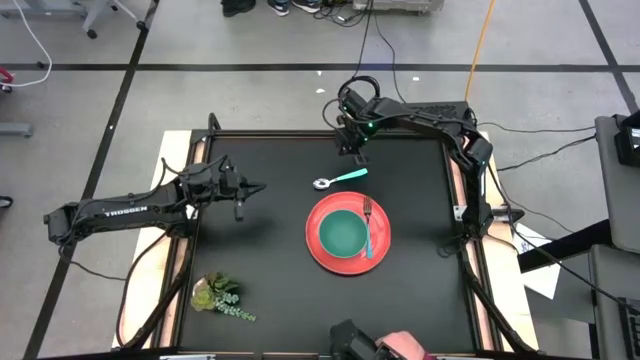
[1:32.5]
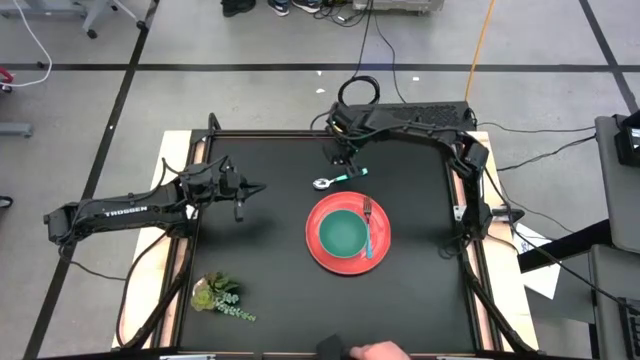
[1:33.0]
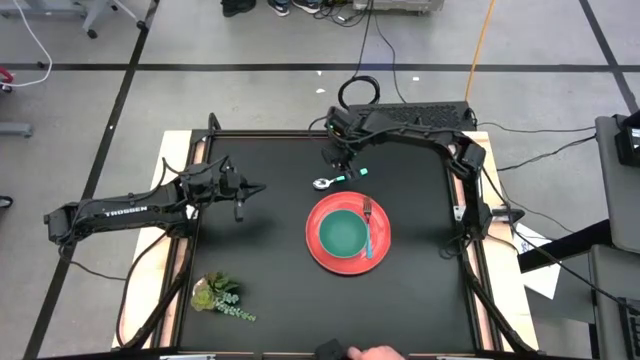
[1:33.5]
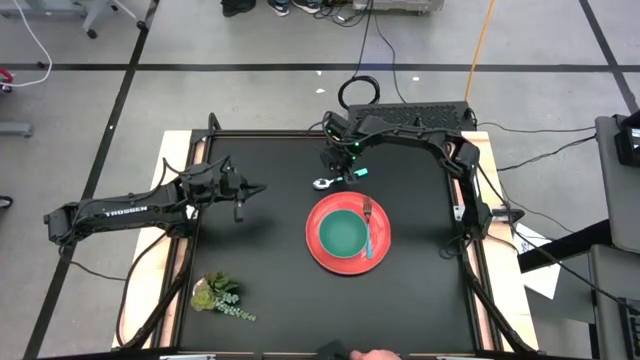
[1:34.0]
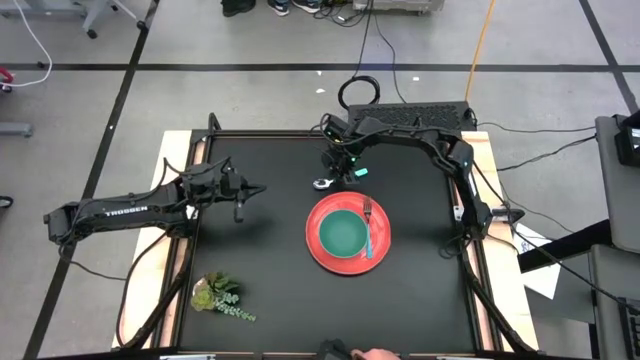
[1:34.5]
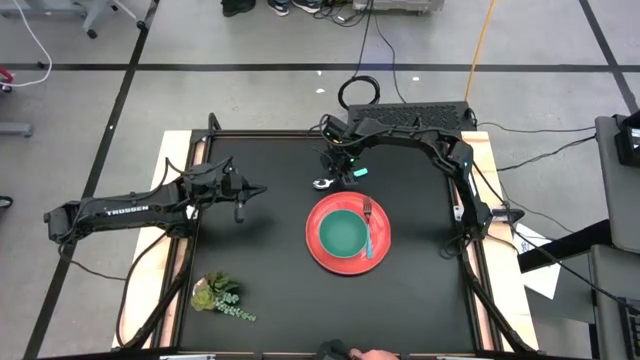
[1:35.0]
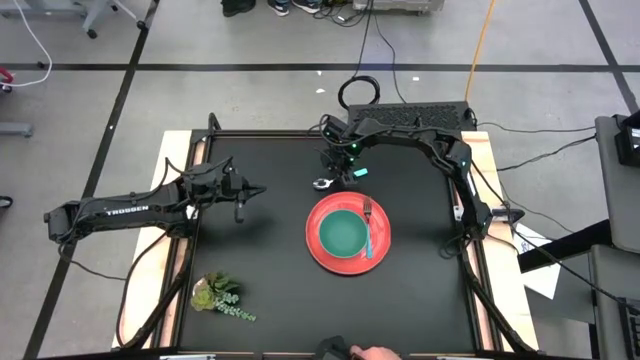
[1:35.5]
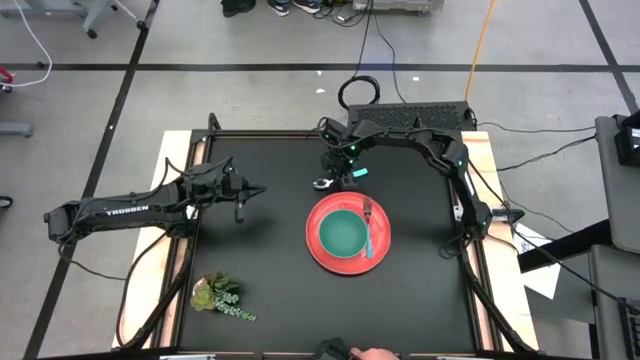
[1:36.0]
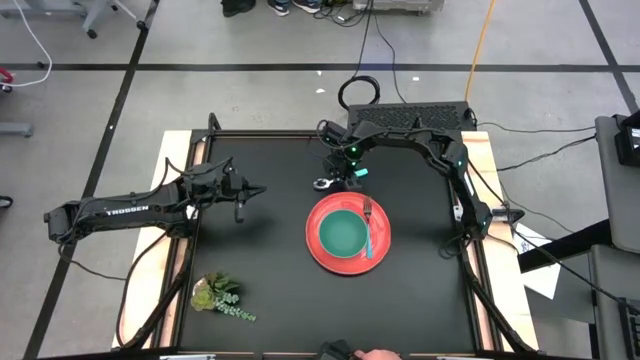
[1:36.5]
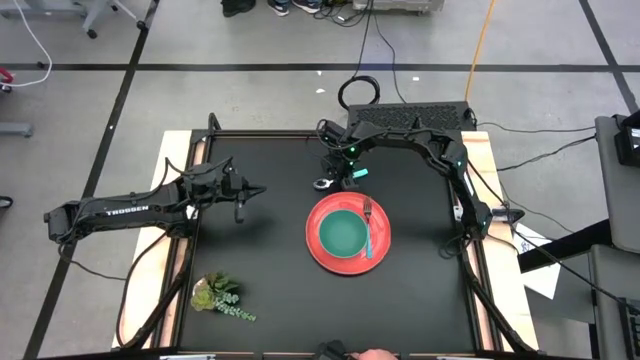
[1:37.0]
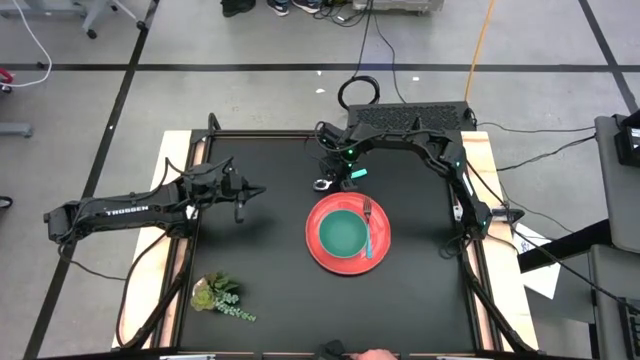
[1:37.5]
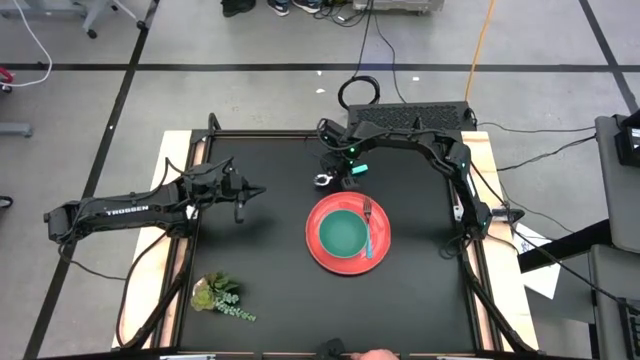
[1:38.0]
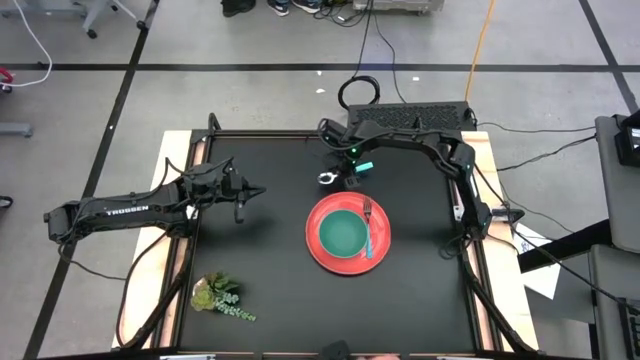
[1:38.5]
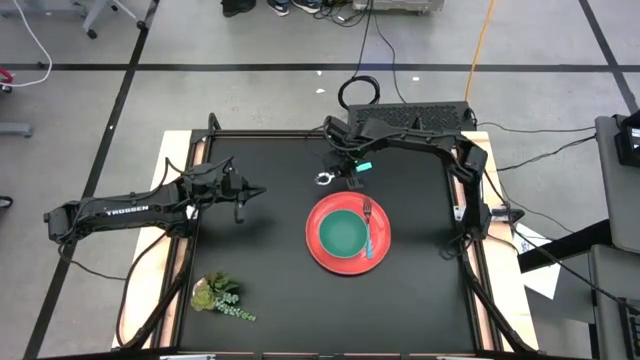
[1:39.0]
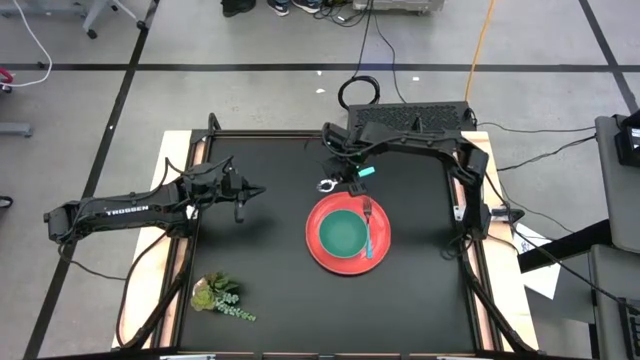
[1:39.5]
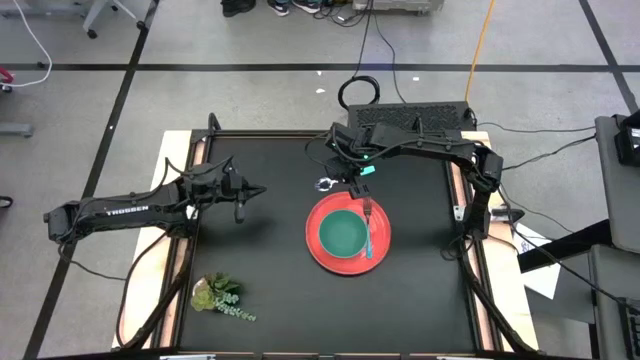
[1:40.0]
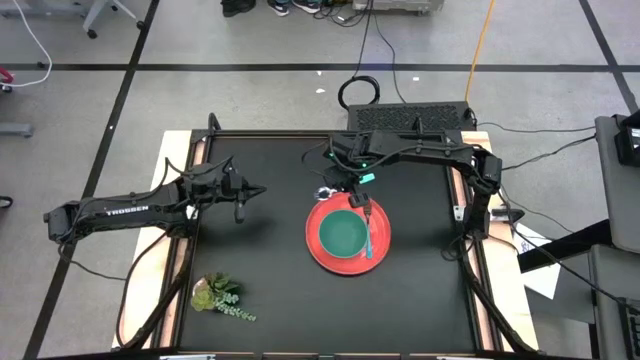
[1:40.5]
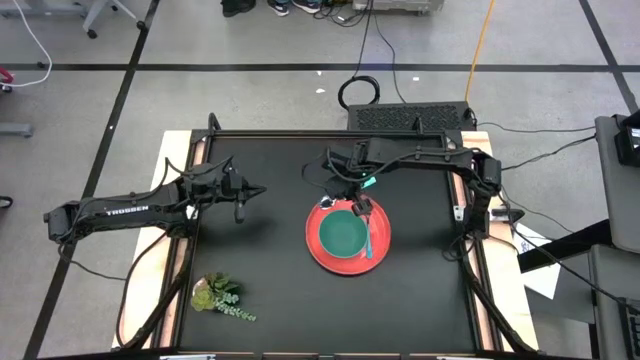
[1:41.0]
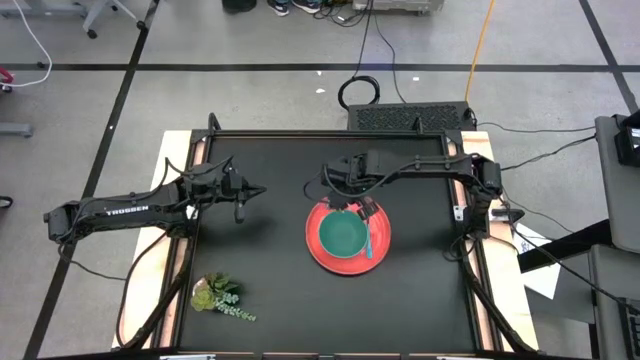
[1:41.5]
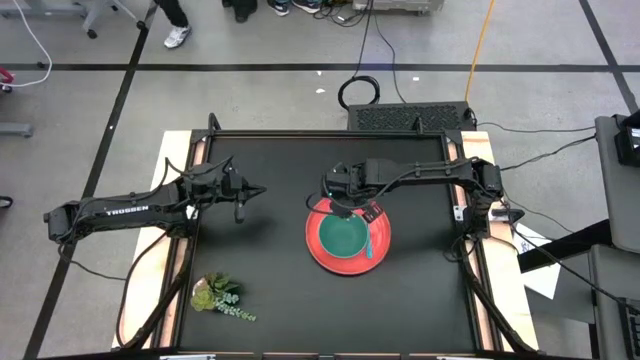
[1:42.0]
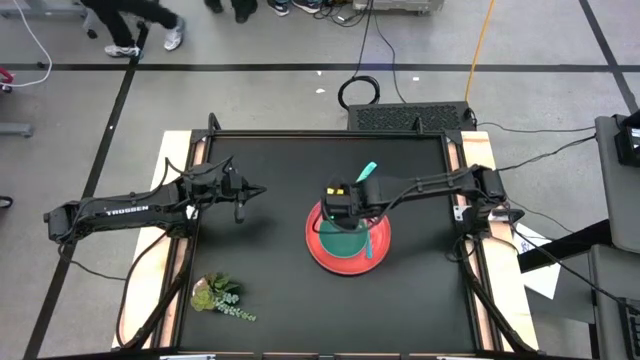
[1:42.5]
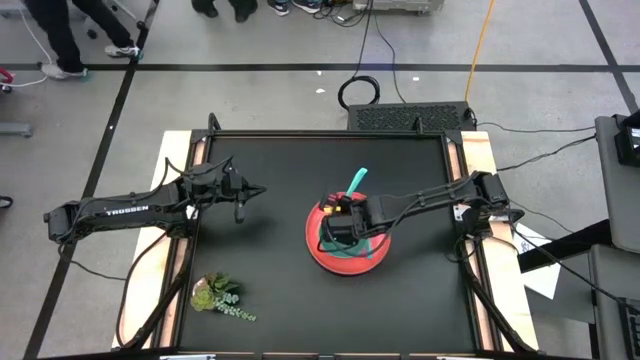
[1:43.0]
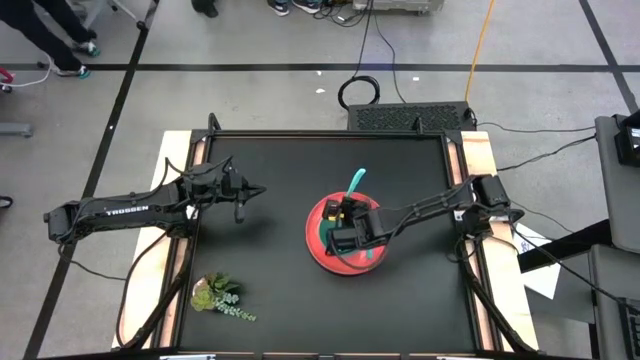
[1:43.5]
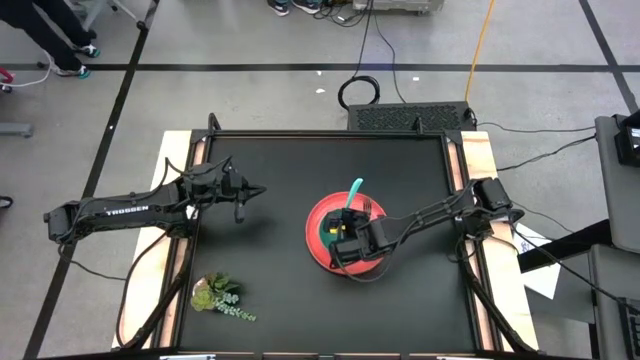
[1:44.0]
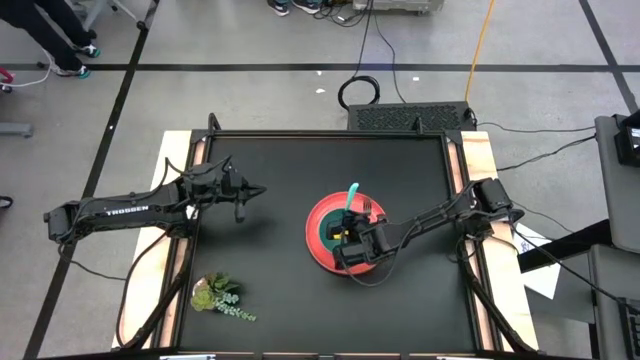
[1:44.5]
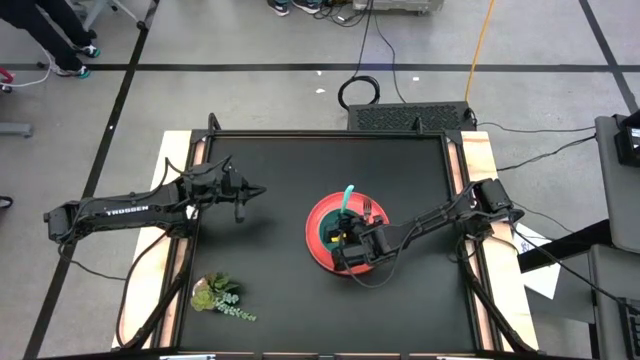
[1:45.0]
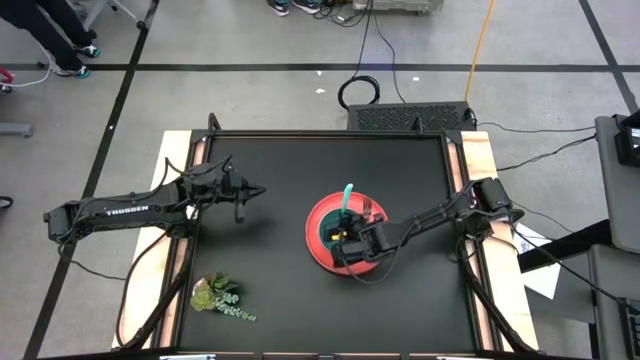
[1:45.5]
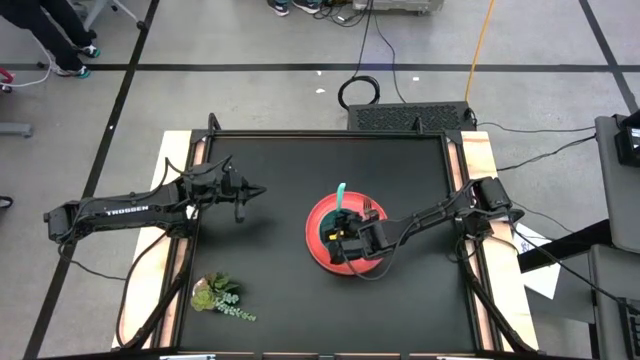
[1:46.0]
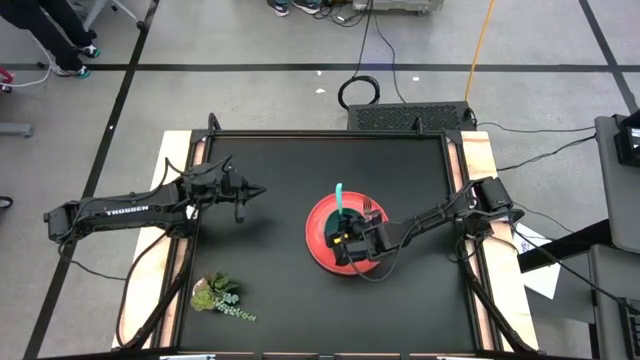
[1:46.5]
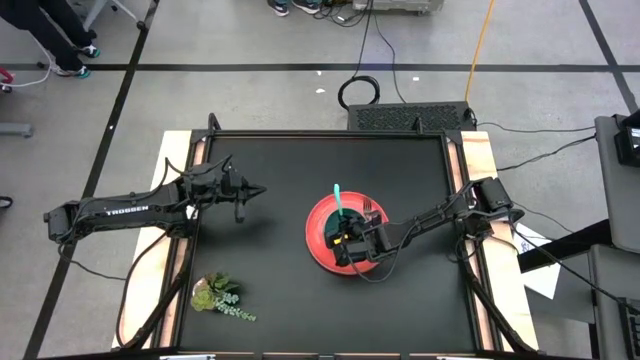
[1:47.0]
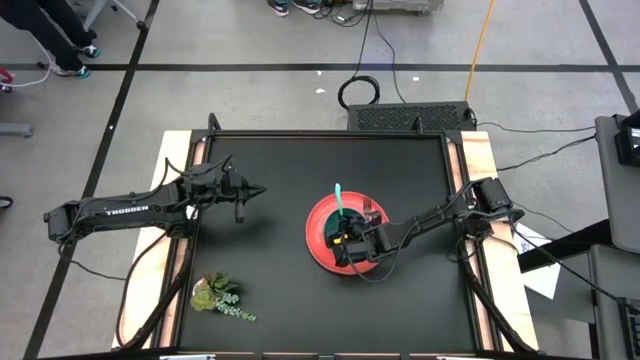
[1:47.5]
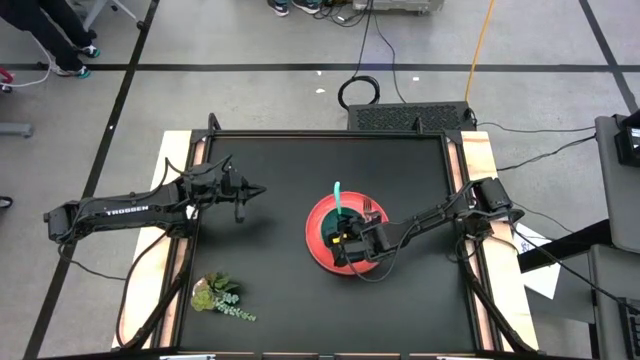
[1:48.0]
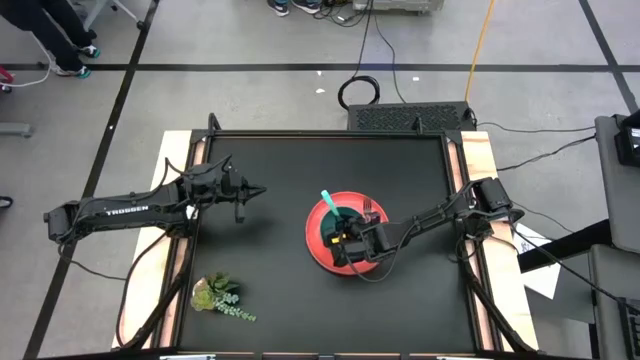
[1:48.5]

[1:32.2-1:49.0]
Task: Set table place
Put the blue spoon into the green bowl

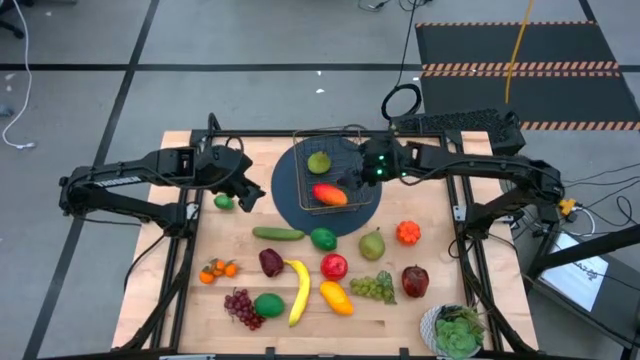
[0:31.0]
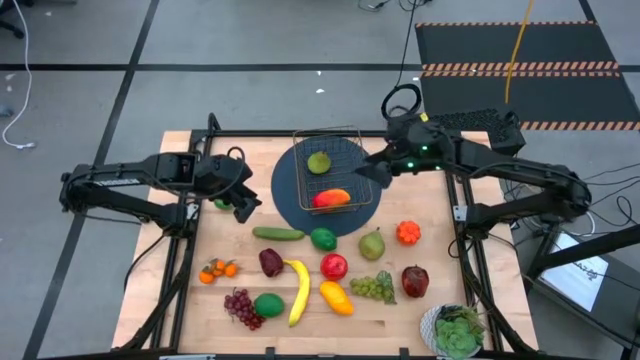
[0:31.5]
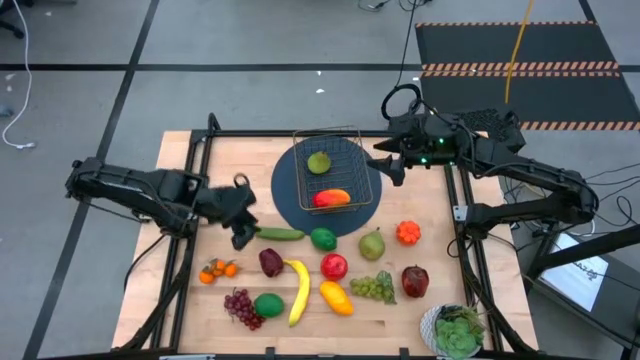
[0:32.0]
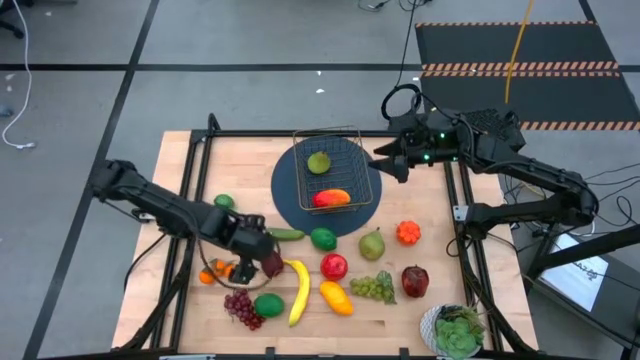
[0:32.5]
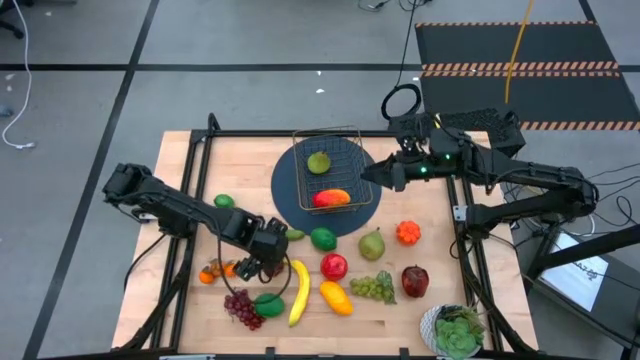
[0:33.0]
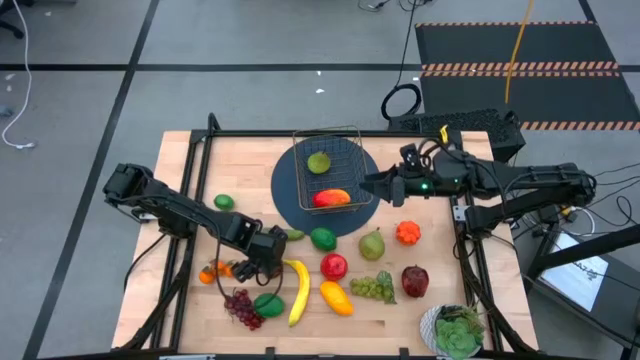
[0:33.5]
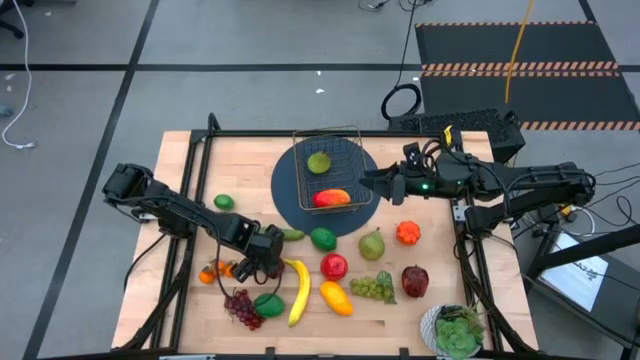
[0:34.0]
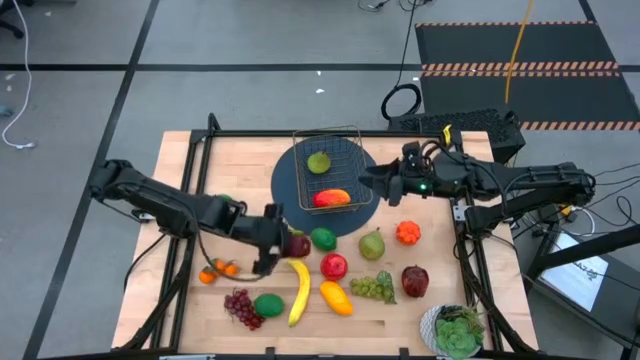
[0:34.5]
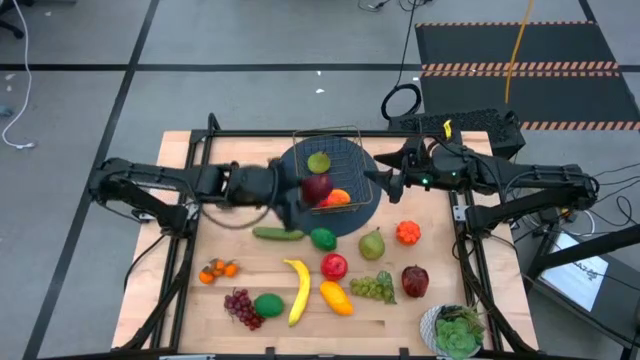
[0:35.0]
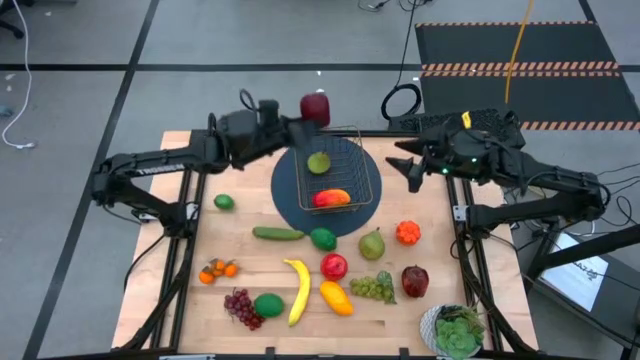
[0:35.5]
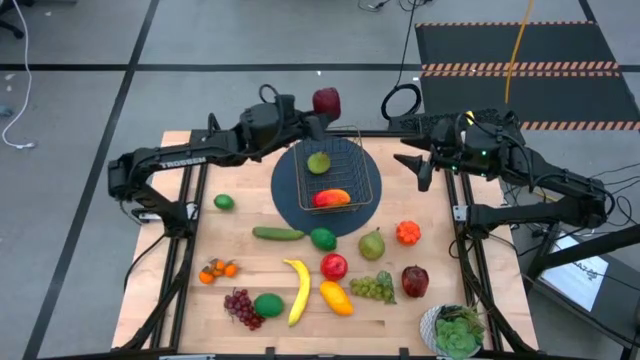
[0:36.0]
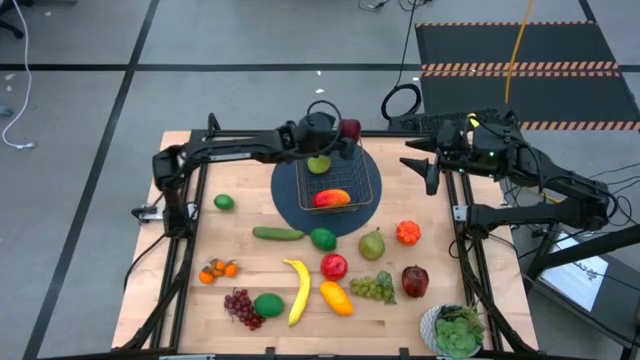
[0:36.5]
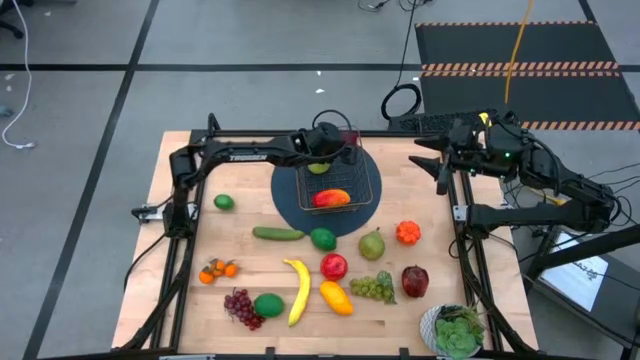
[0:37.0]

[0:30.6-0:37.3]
Task: Build produce basket
Put the left dark red apple into the gold wire basket
